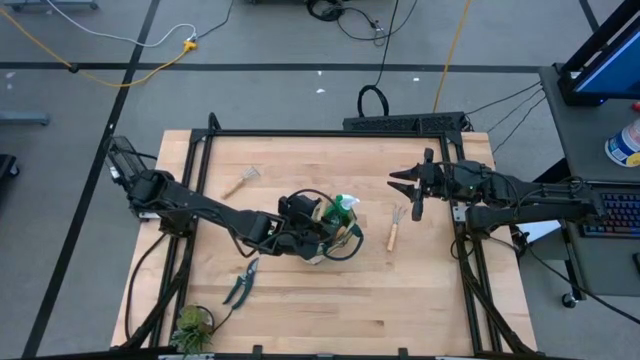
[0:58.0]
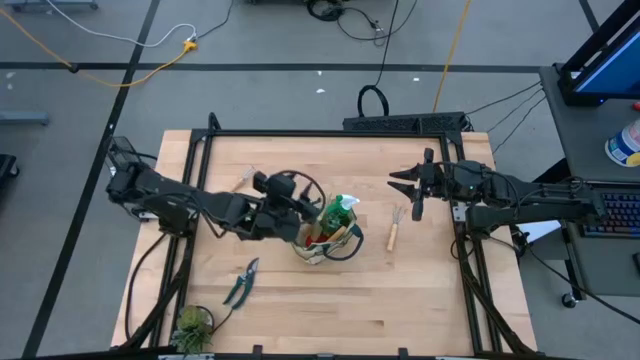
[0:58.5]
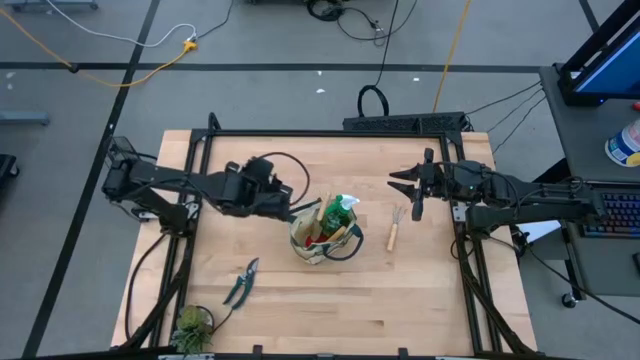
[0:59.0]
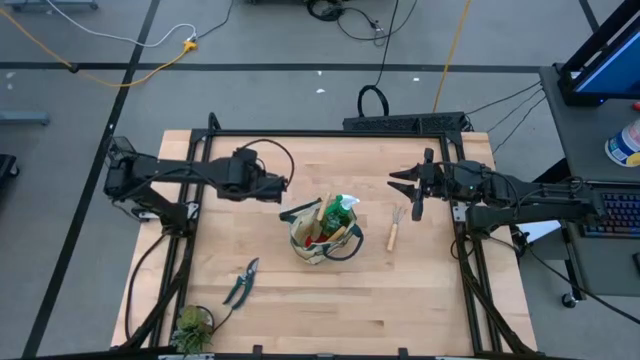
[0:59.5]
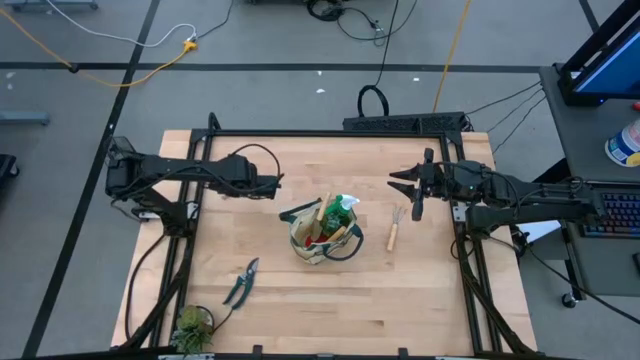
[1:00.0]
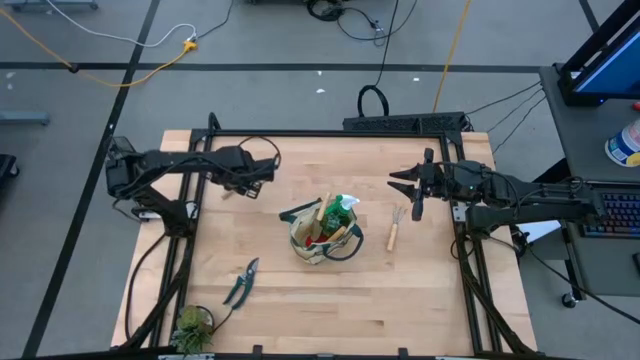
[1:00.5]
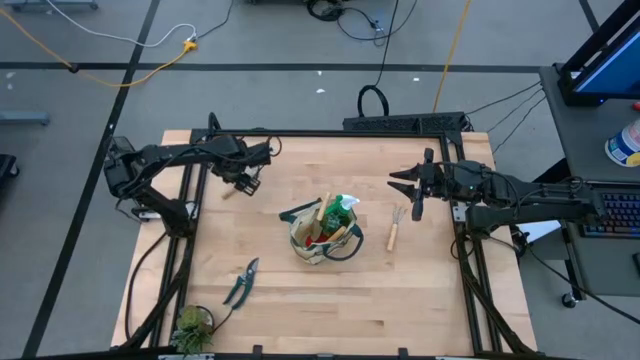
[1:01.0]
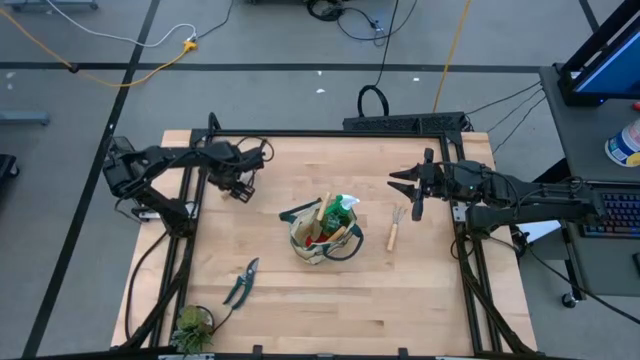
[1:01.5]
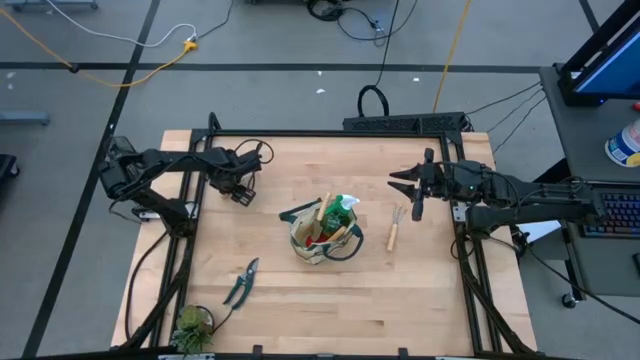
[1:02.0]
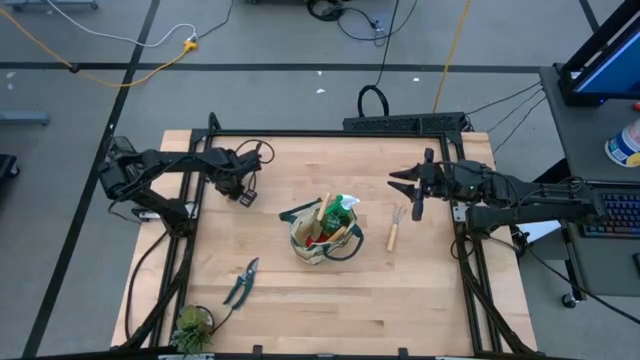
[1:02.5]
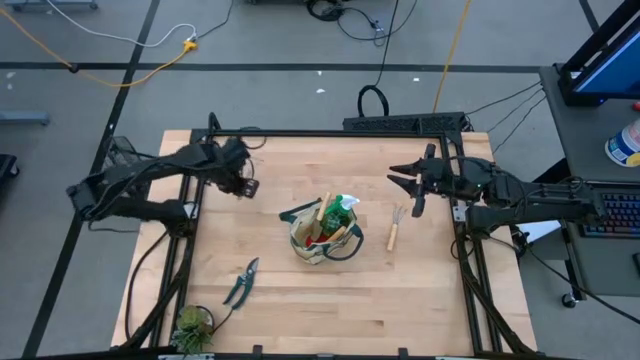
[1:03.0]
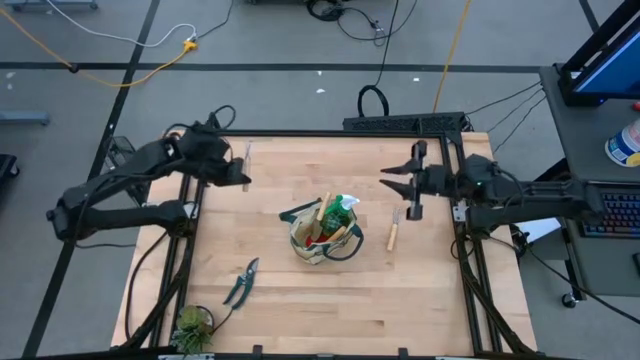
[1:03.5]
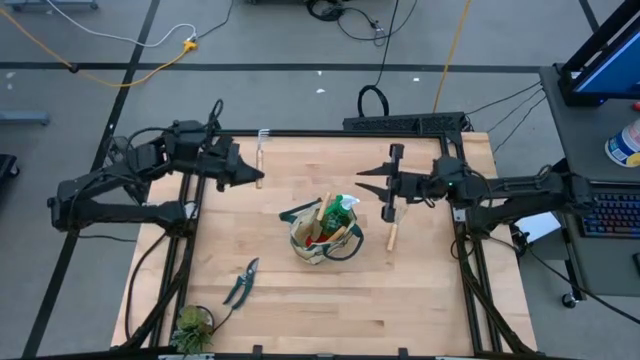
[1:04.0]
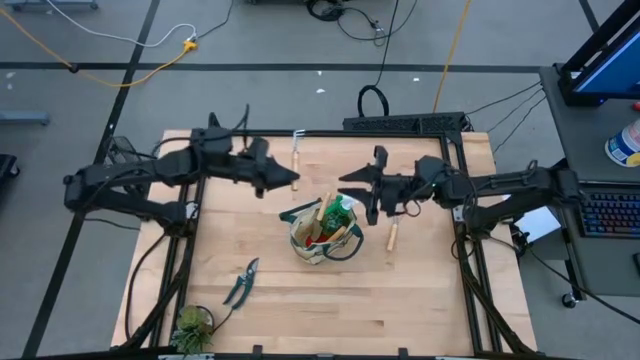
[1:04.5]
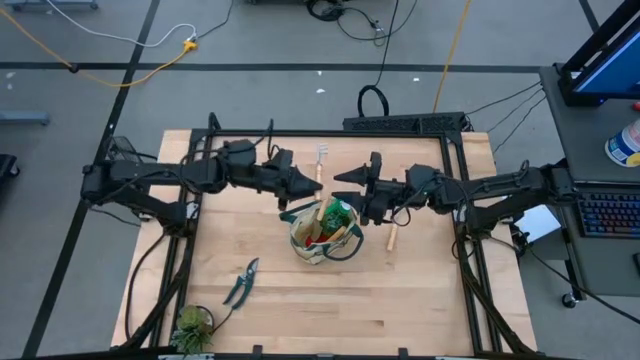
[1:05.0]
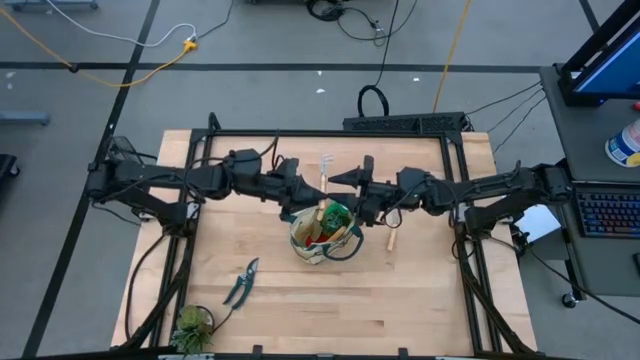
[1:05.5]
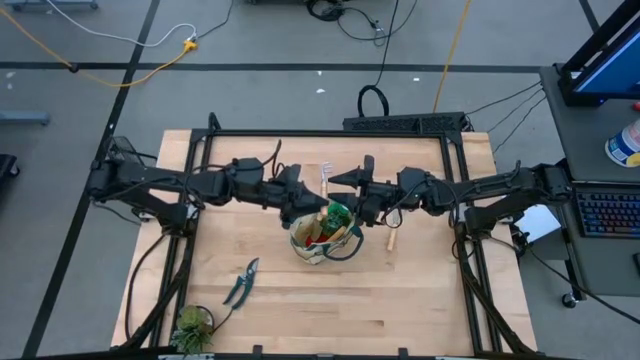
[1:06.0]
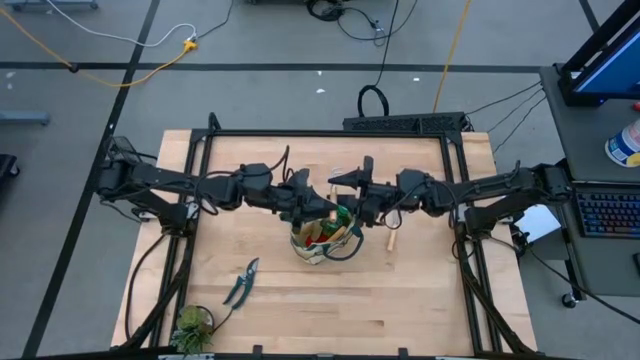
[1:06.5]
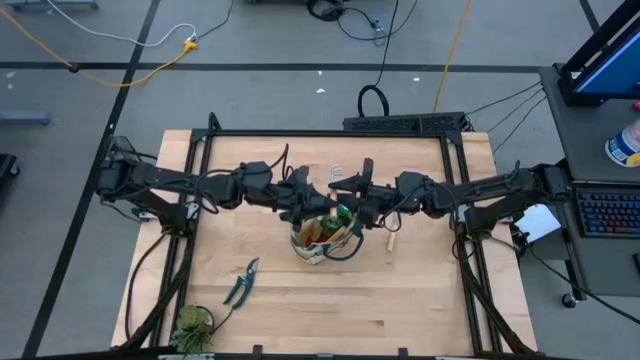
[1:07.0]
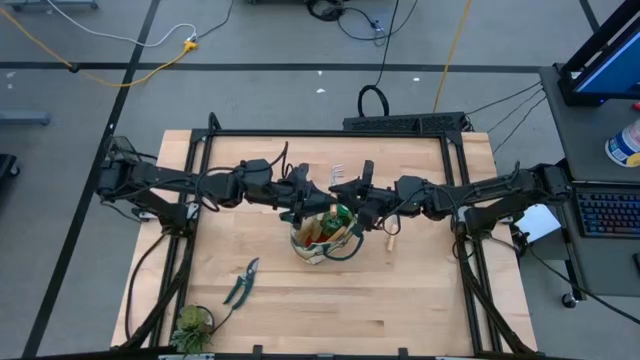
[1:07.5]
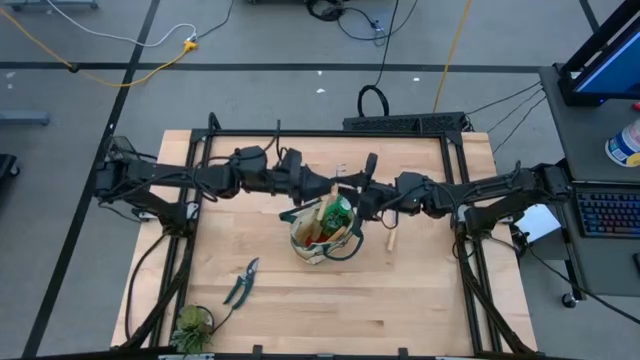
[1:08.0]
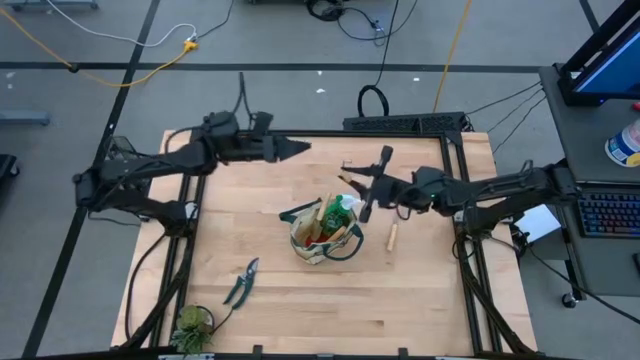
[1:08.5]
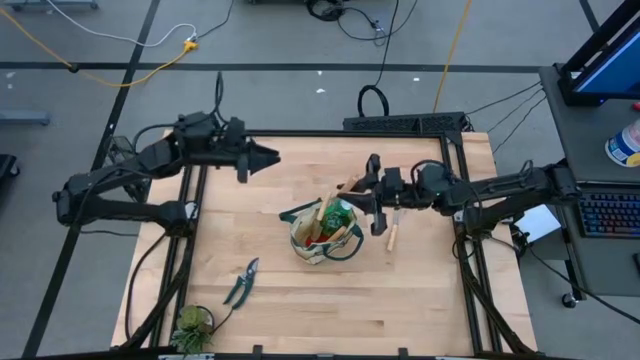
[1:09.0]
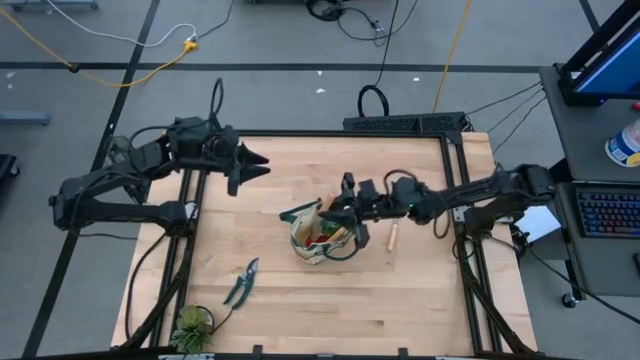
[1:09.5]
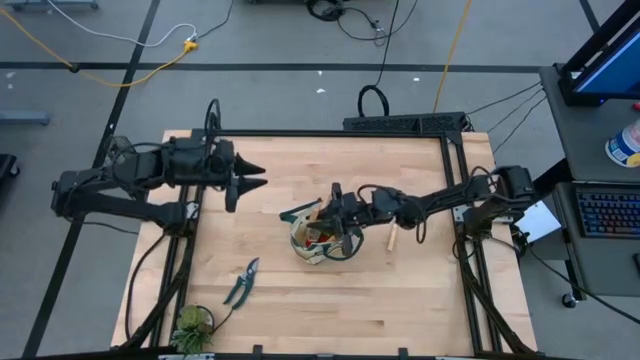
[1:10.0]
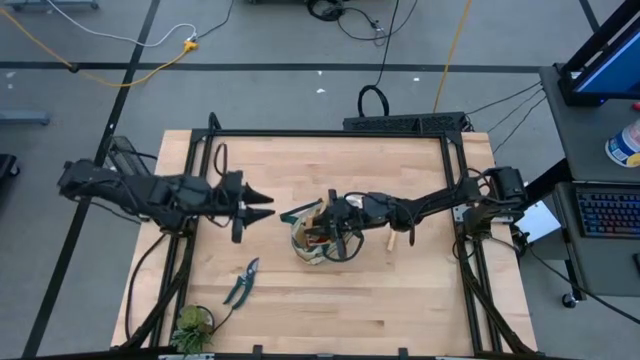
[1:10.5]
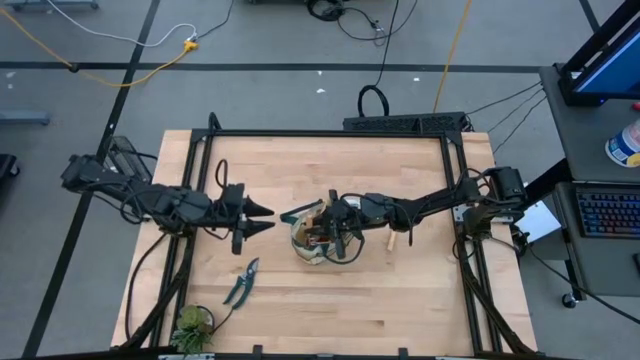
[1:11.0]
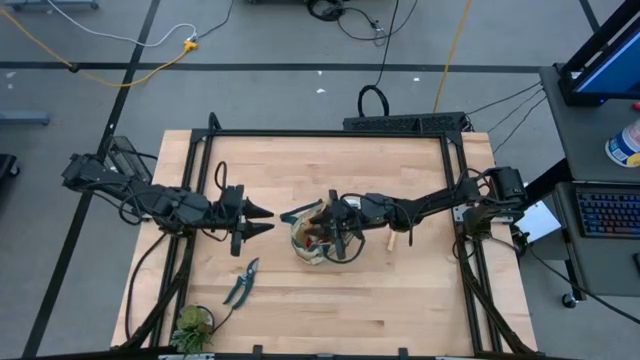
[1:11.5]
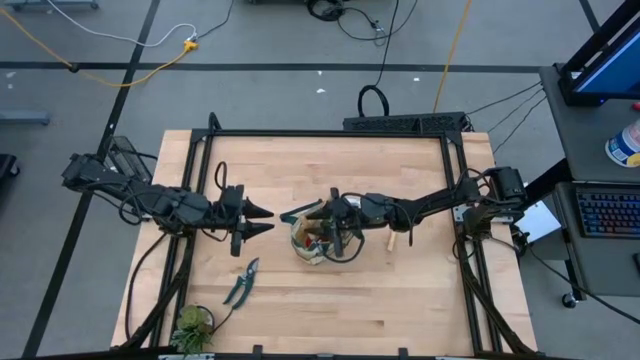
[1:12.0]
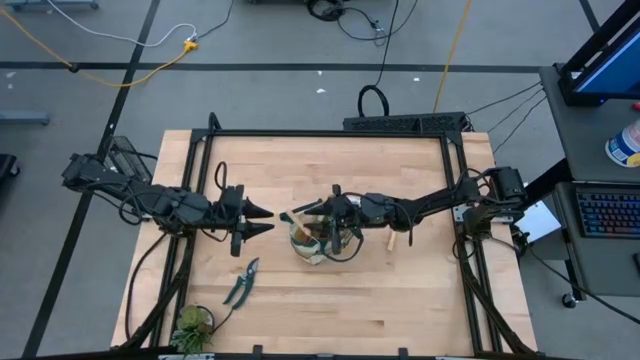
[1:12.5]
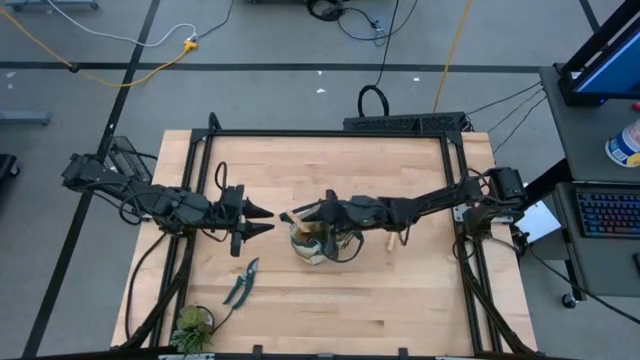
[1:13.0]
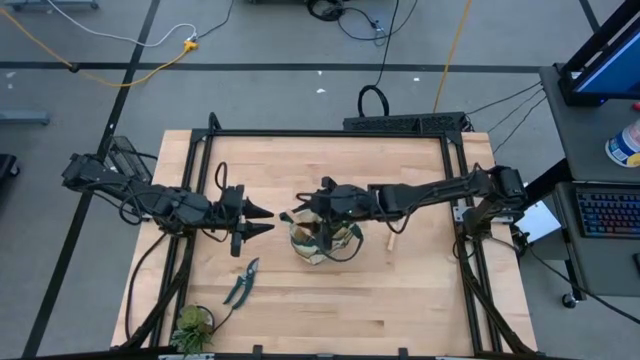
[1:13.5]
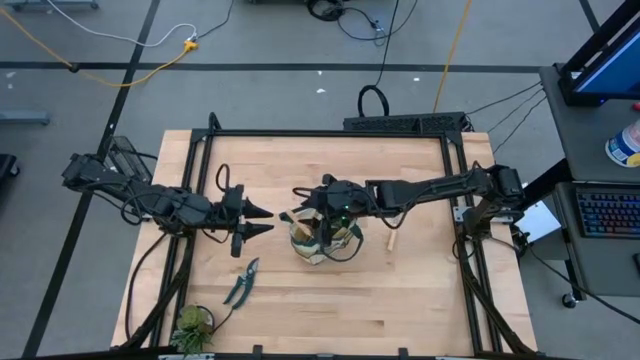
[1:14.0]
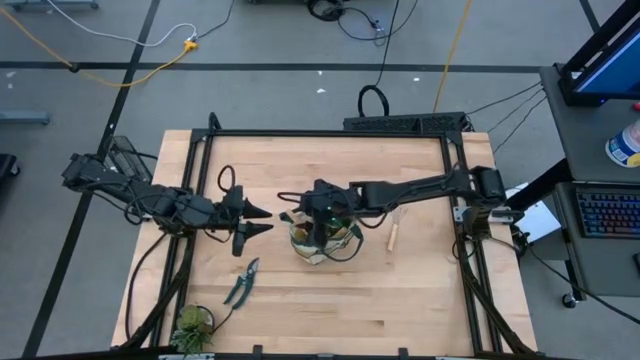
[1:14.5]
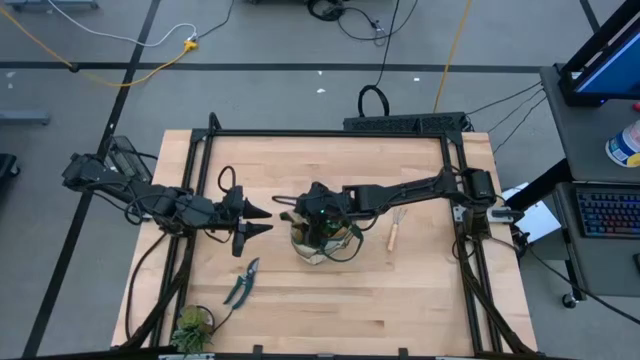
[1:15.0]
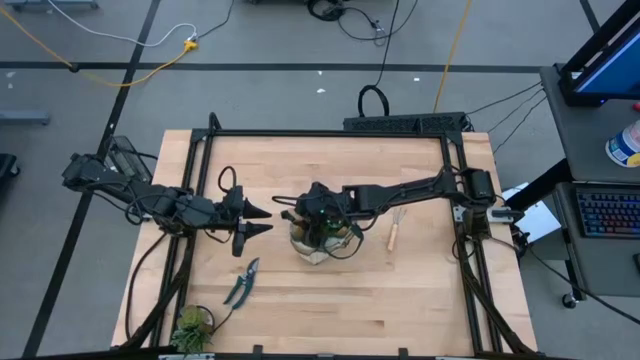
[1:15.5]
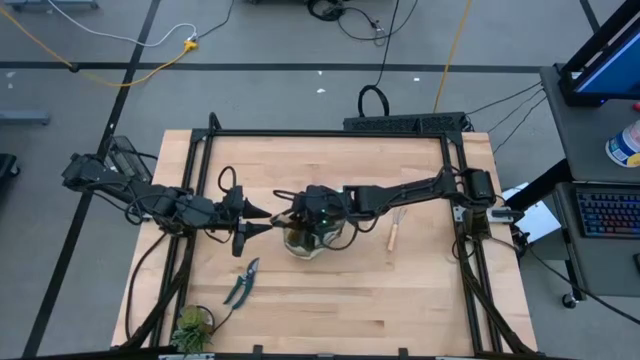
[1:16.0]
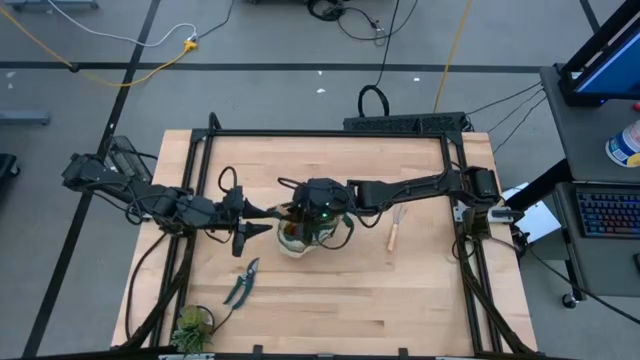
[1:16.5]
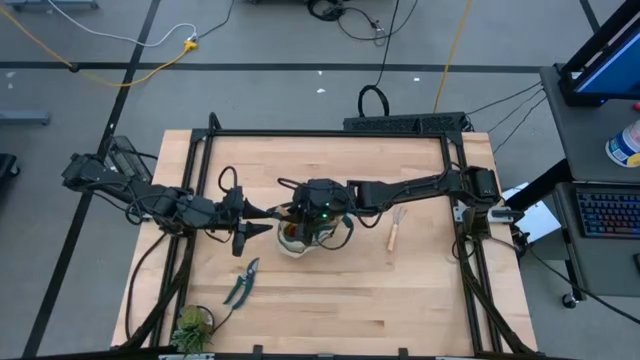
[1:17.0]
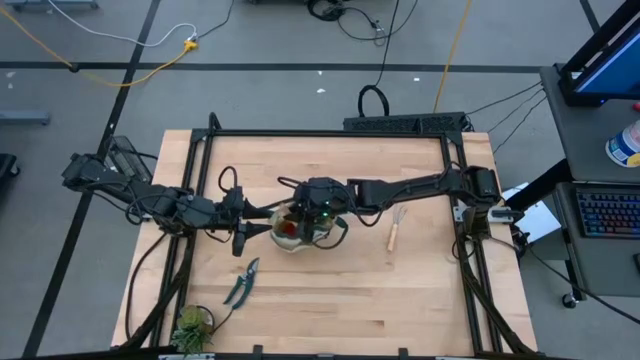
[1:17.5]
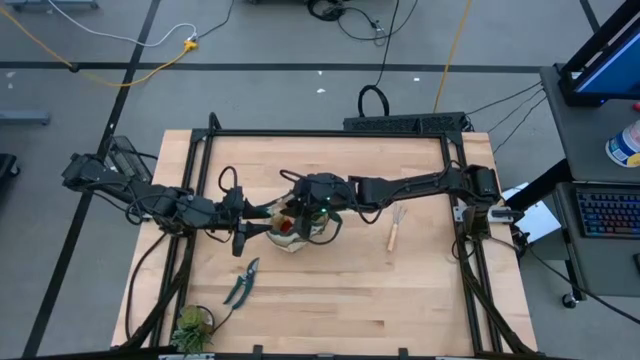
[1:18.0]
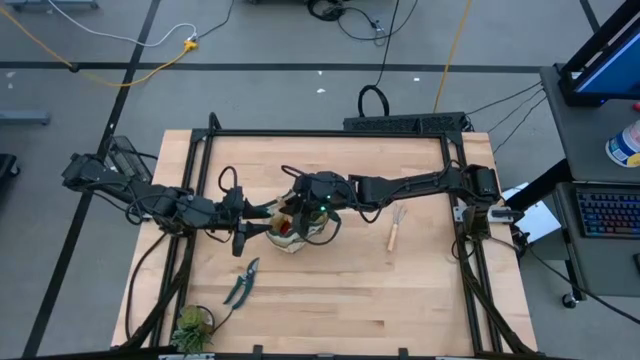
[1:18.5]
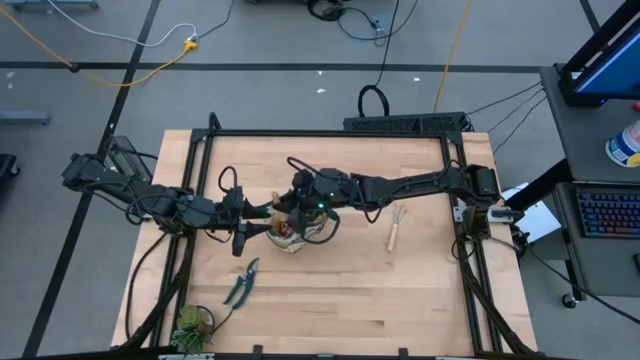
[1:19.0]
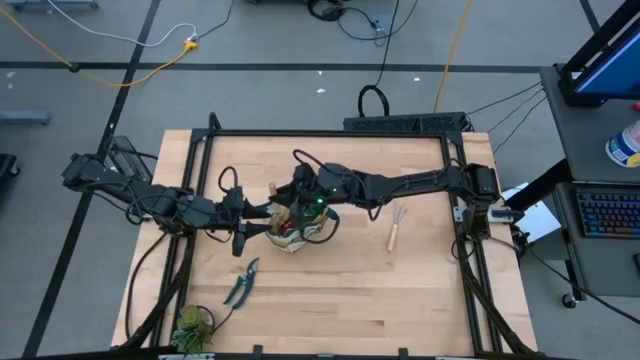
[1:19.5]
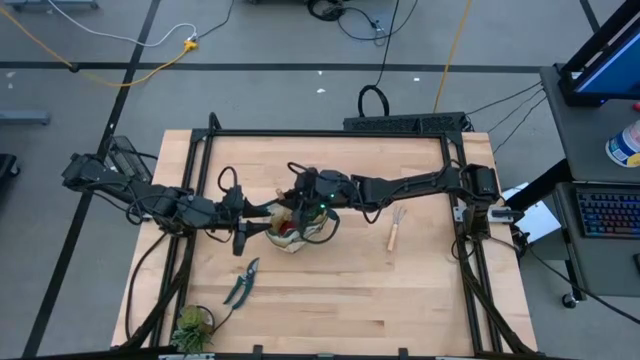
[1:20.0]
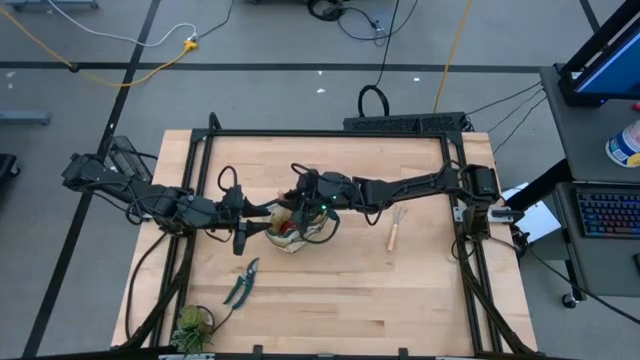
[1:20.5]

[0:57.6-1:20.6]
Task: Pick & Place Garden tools in Gardening bag
Put the top hand rake into the gardening bag
